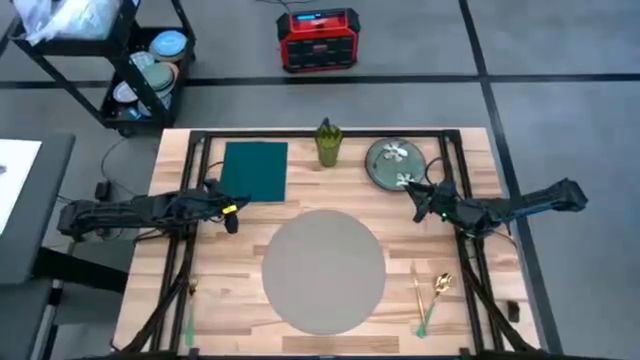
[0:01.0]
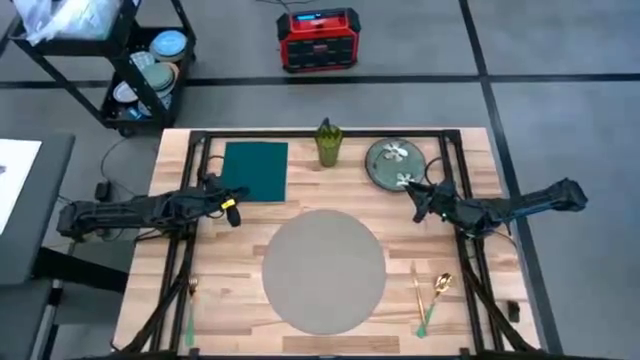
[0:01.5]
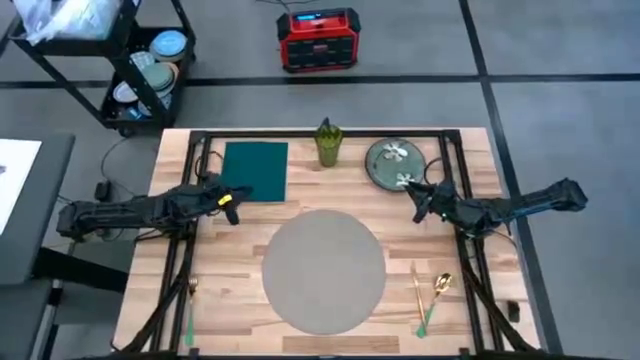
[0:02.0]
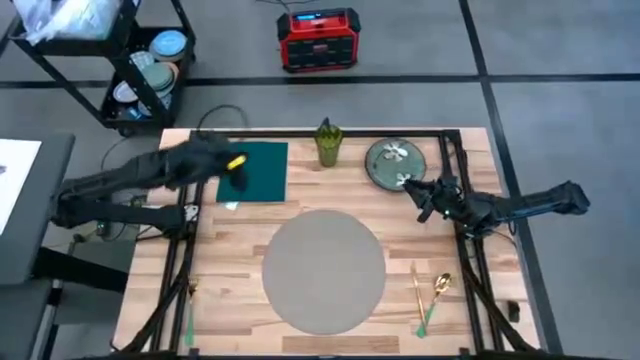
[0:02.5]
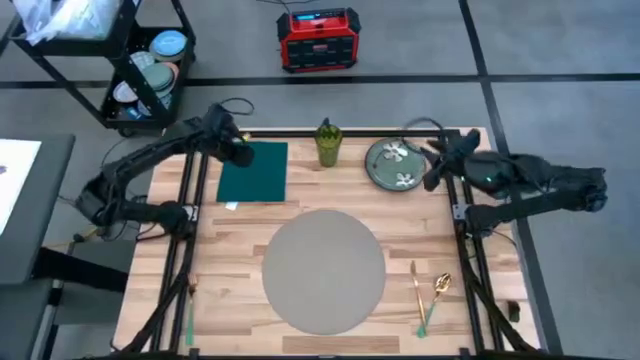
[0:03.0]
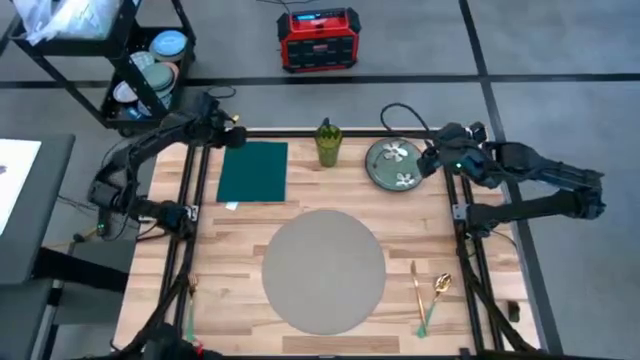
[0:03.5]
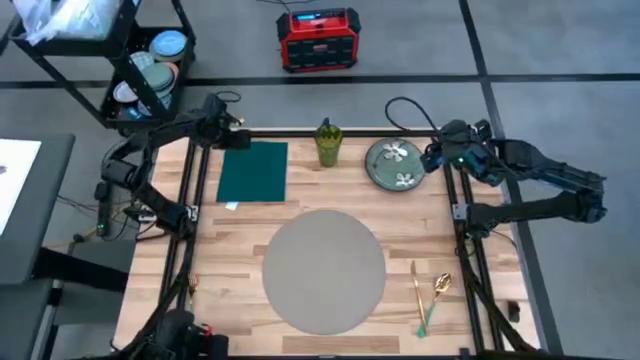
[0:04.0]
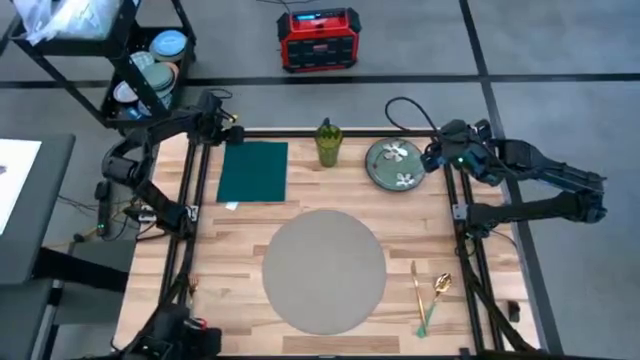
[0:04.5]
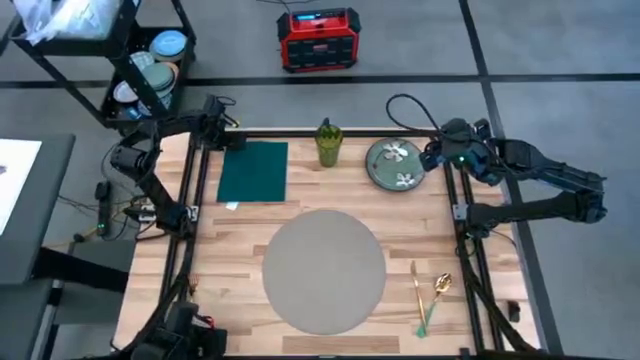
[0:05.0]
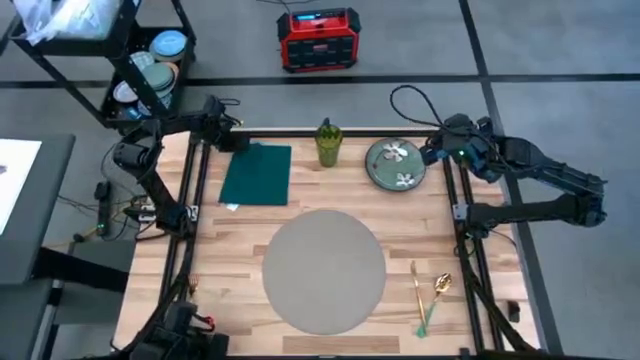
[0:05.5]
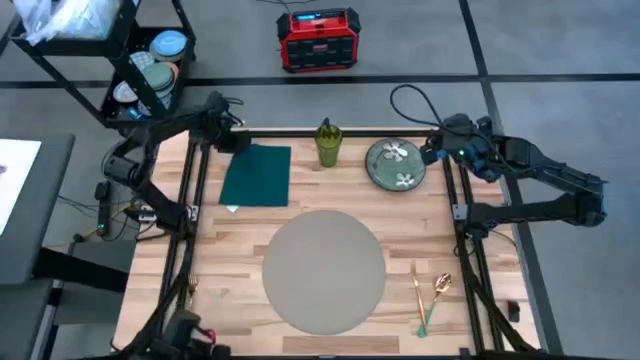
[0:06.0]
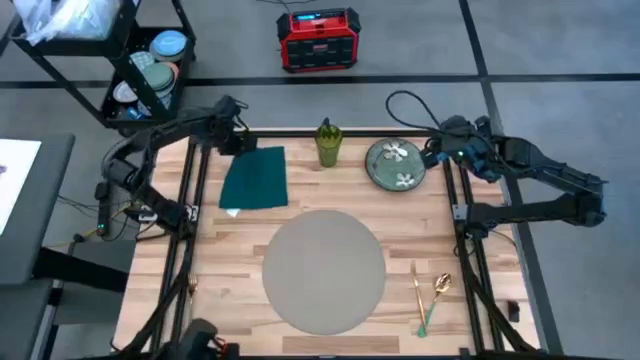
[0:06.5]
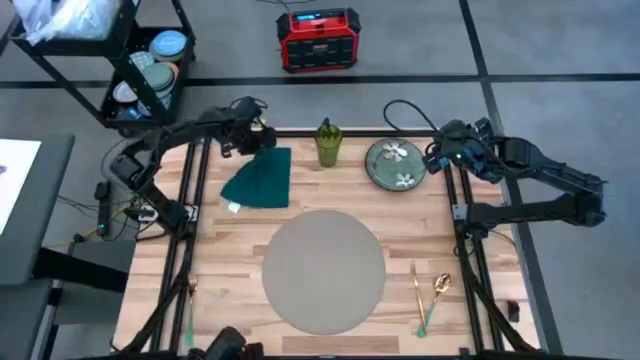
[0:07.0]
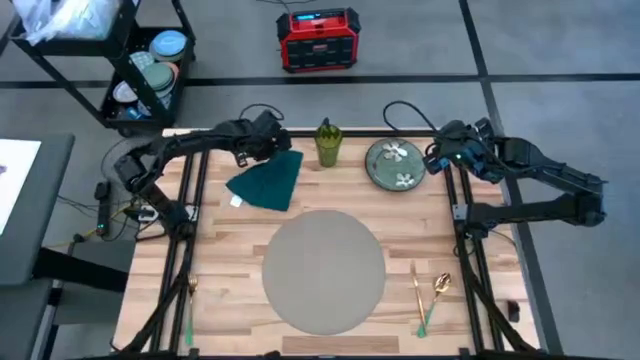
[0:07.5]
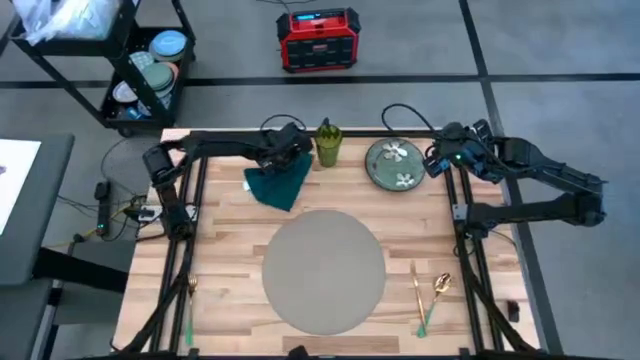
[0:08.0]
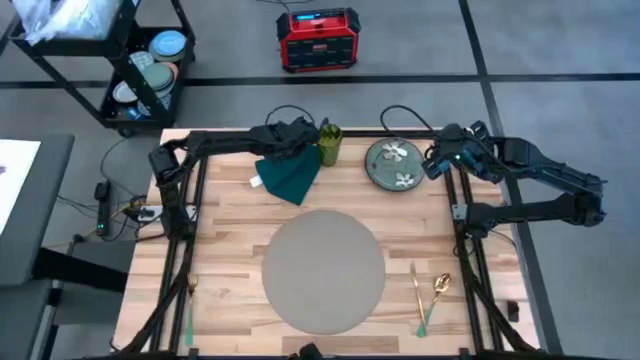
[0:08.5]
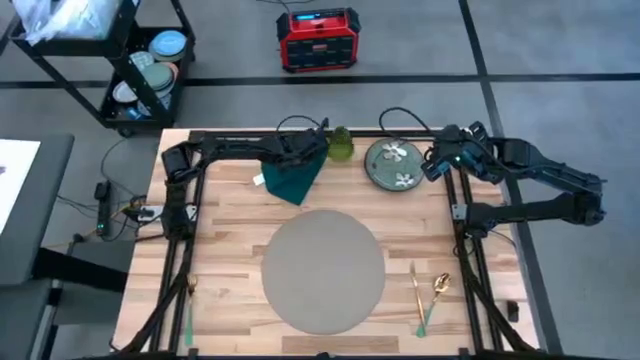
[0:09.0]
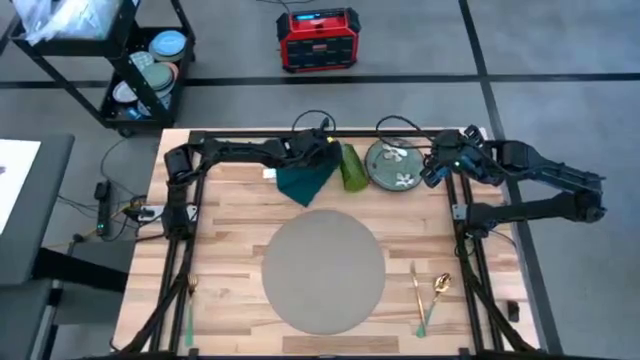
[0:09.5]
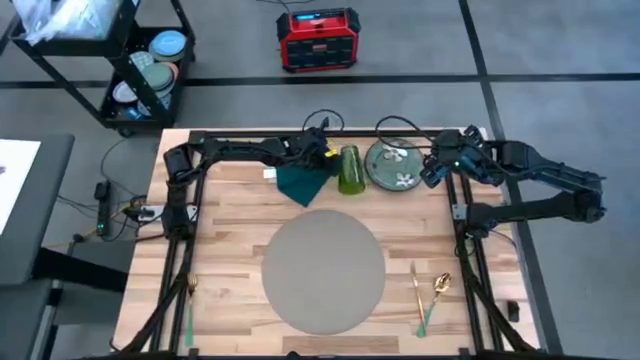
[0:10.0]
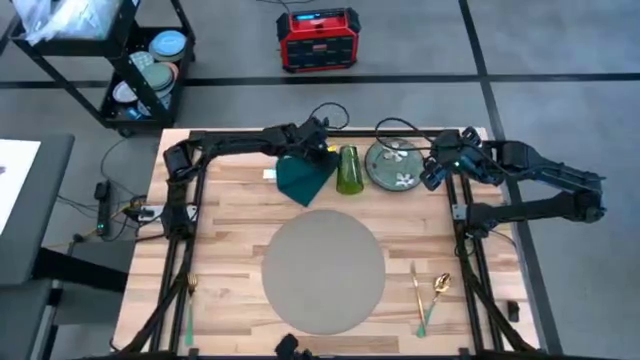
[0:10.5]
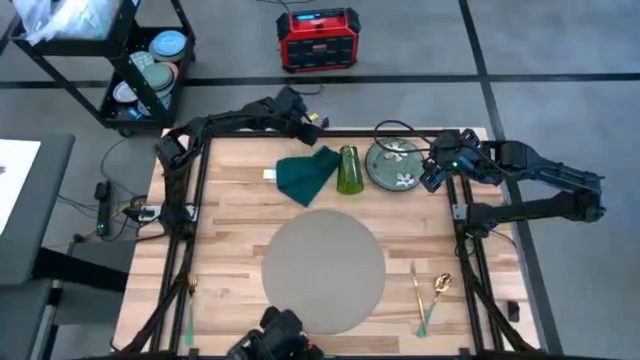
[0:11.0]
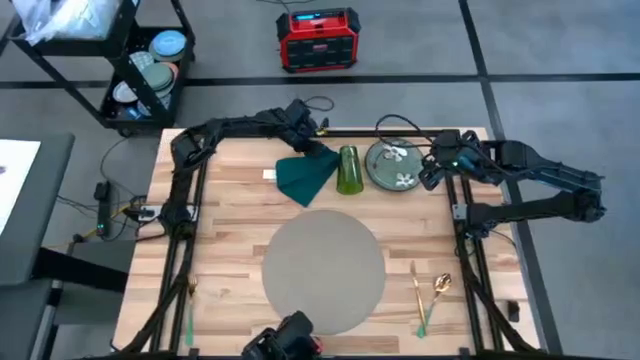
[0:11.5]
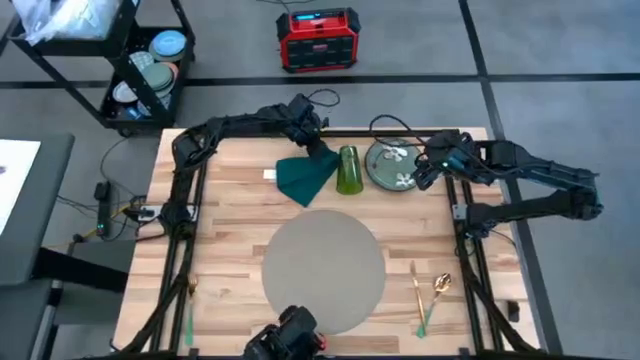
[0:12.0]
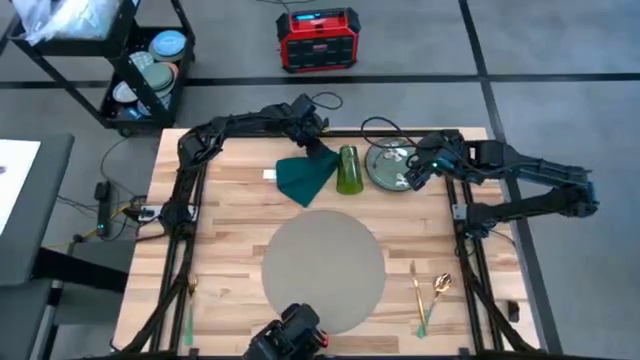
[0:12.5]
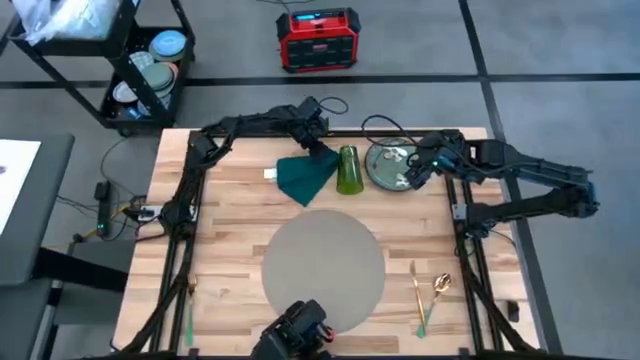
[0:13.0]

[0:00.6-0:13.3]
Task: Set table place
Fold the green table napkin

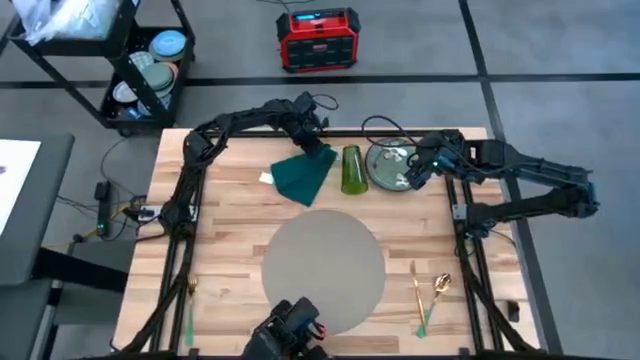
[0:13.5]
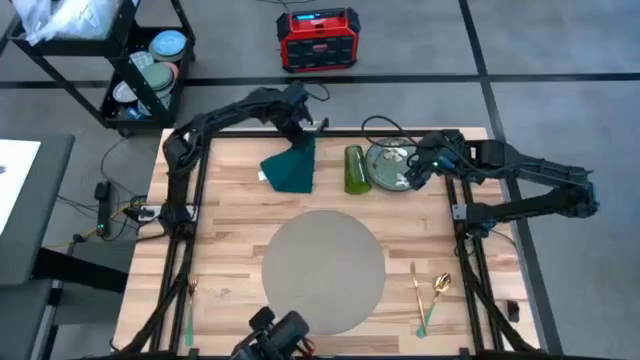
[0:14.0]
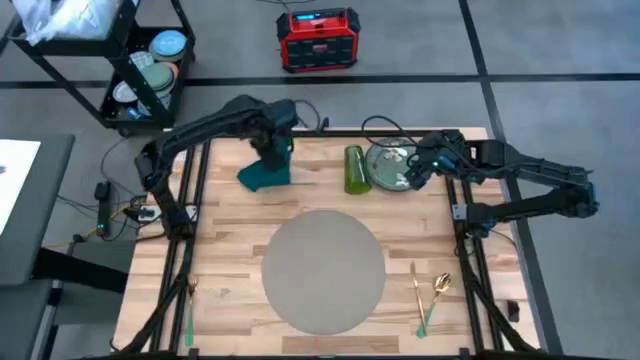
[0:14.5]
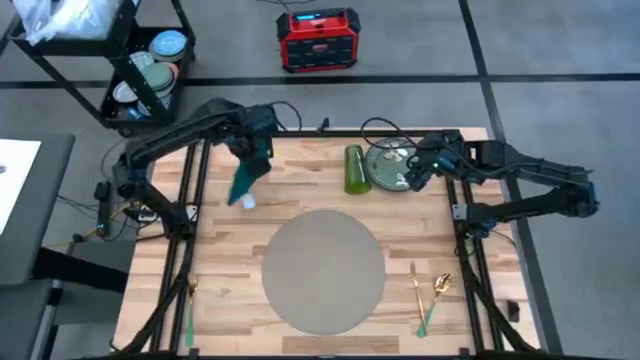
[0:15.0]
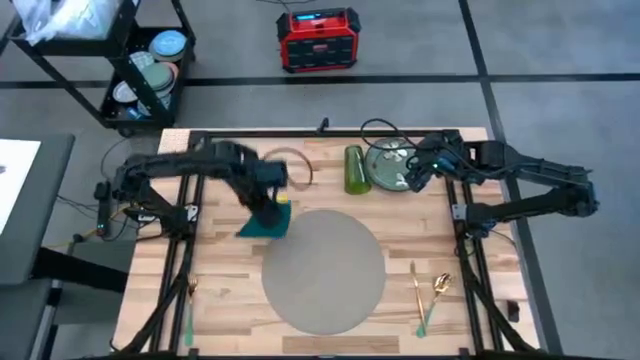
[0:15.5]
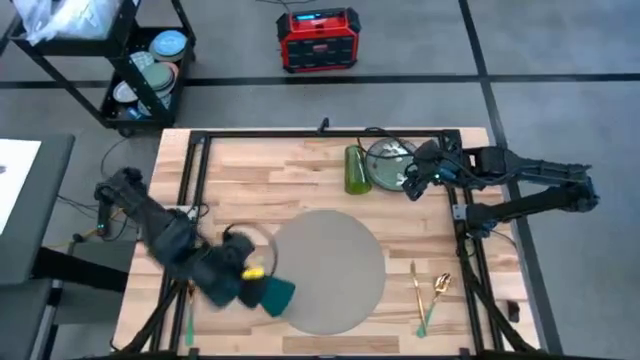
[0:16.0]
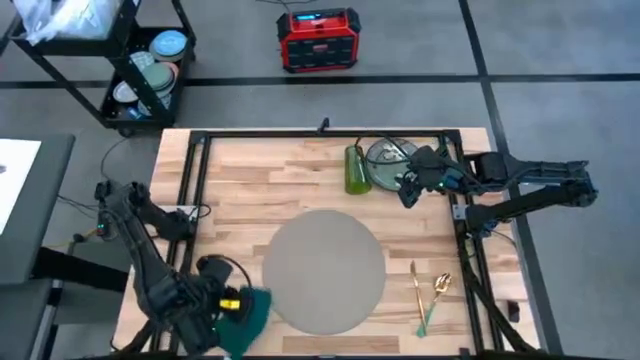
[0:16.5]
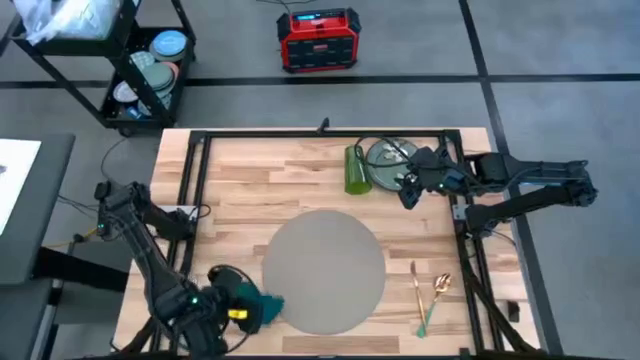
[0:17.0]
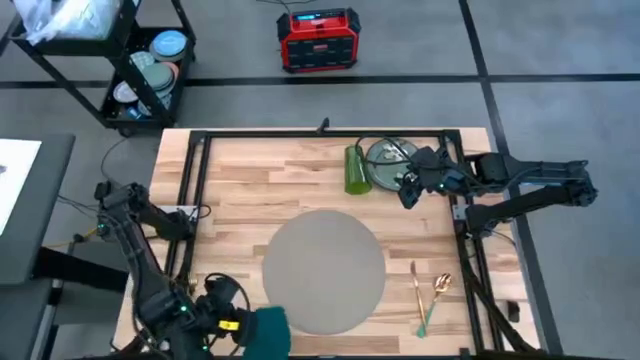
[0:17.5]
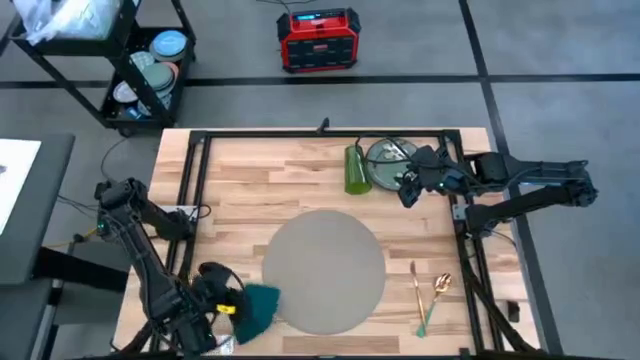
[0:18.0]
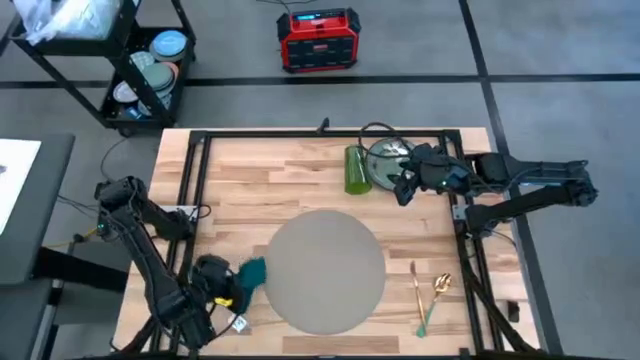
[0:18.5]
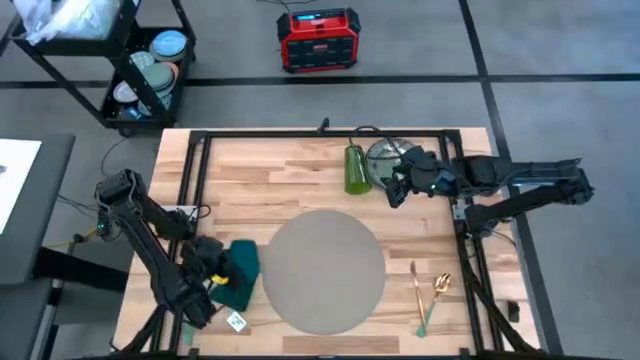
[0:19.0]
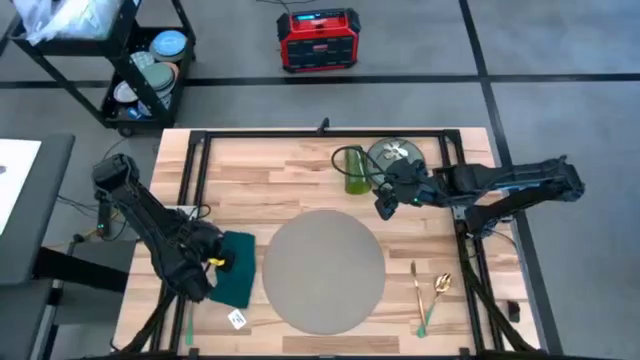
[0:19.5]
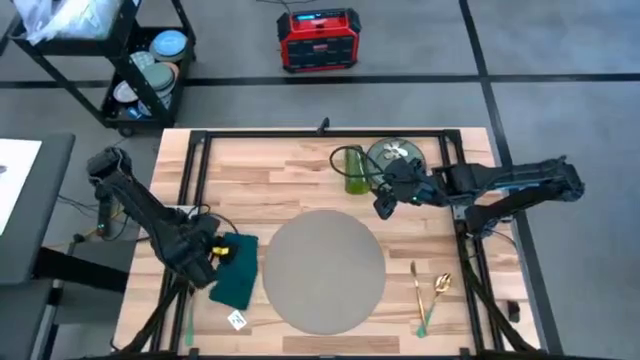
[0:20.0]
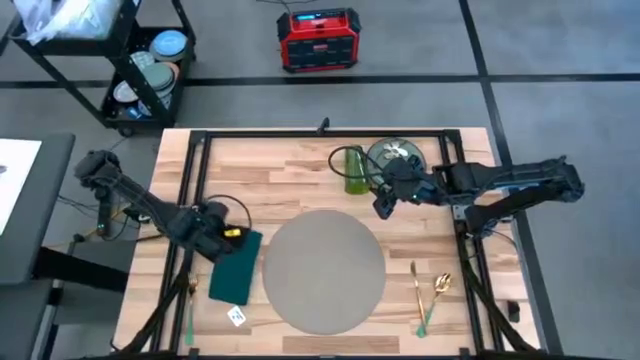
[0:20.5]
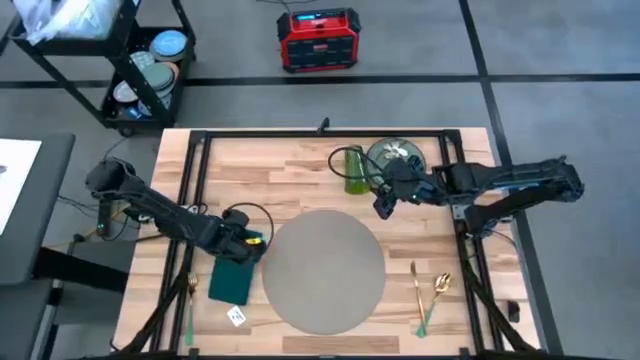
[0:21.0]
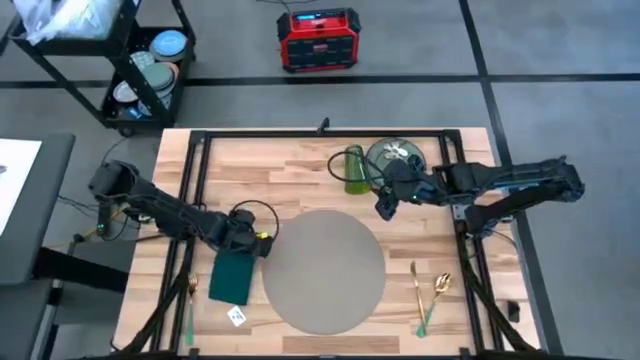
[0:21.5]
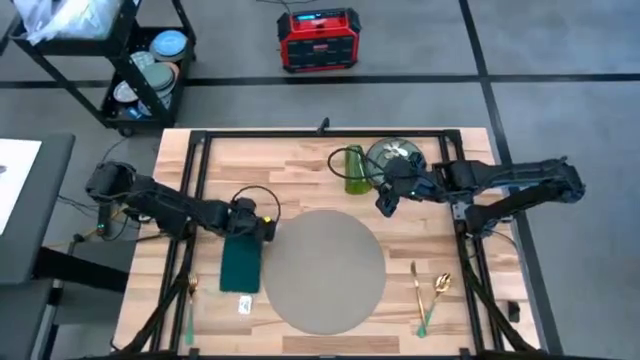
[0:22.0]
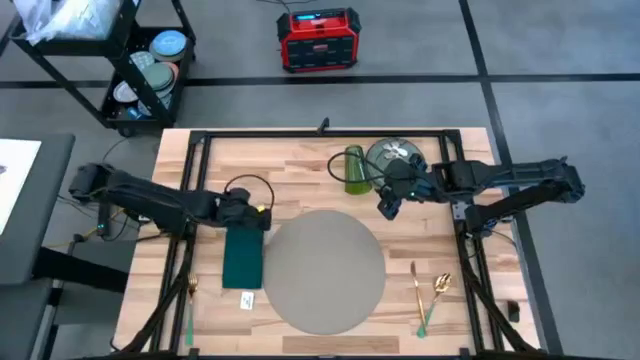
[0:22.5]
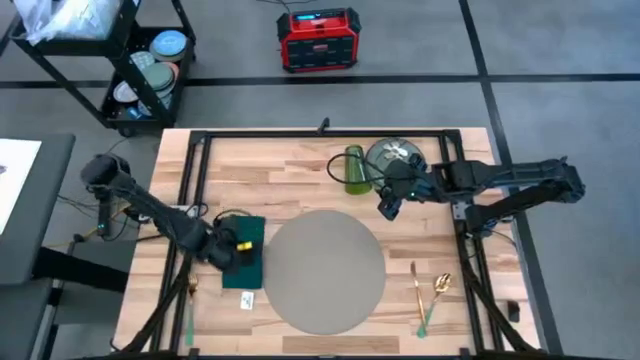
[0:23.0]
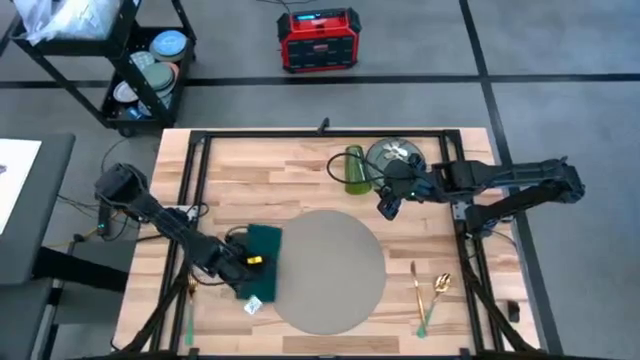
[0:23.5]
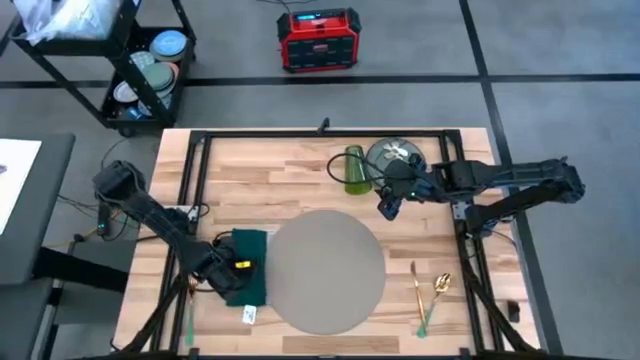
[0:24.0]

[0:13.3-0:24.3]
Put the green table napkin to the left of the gray tablemat
